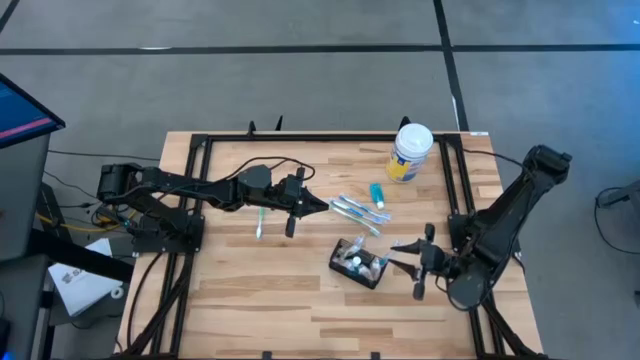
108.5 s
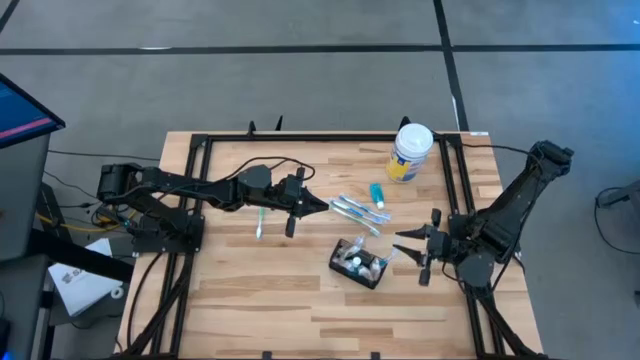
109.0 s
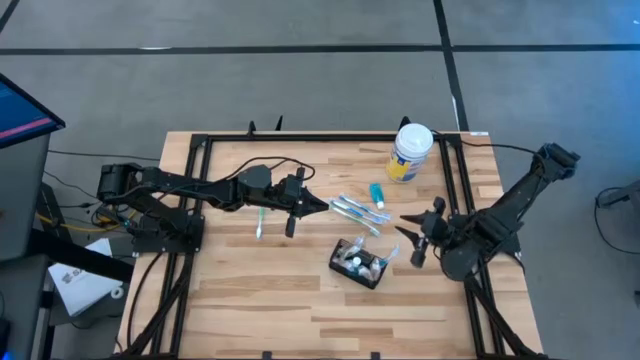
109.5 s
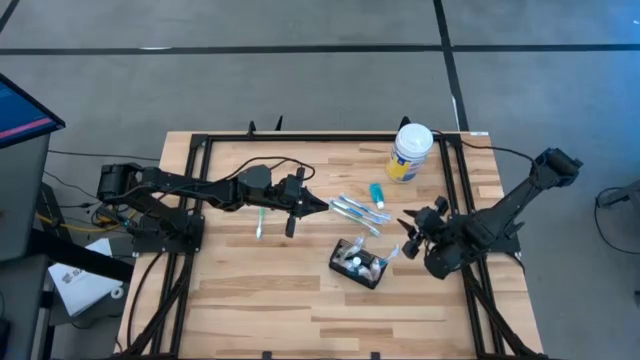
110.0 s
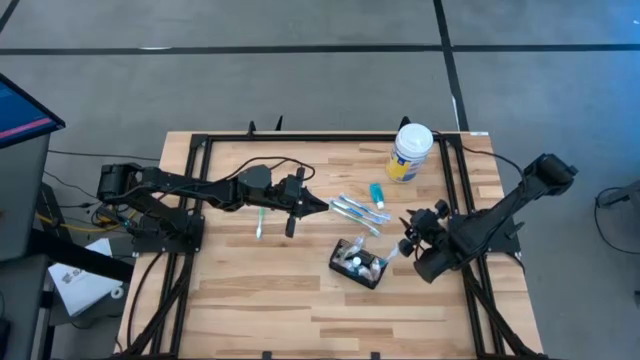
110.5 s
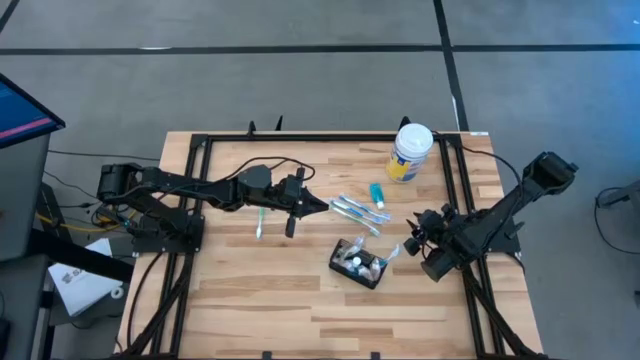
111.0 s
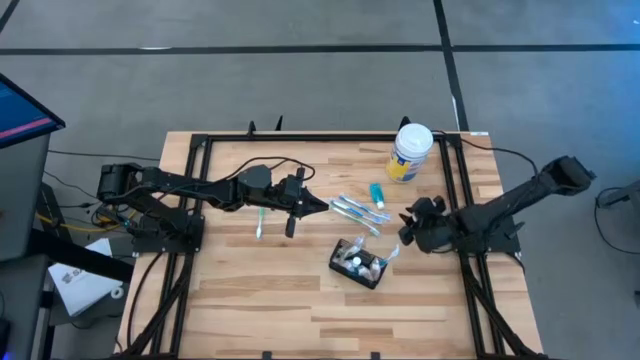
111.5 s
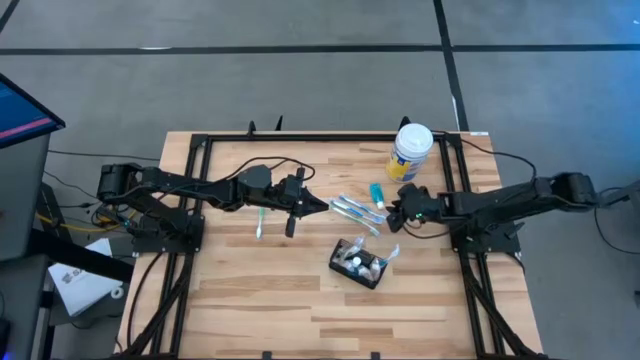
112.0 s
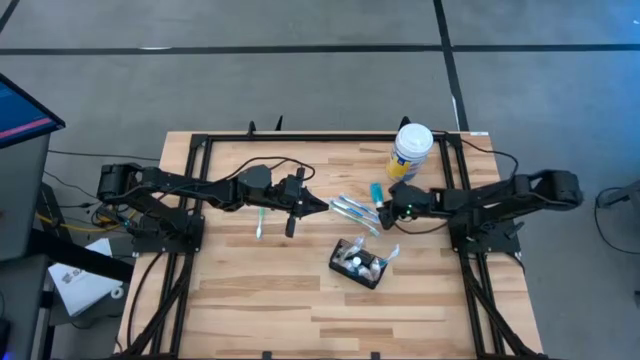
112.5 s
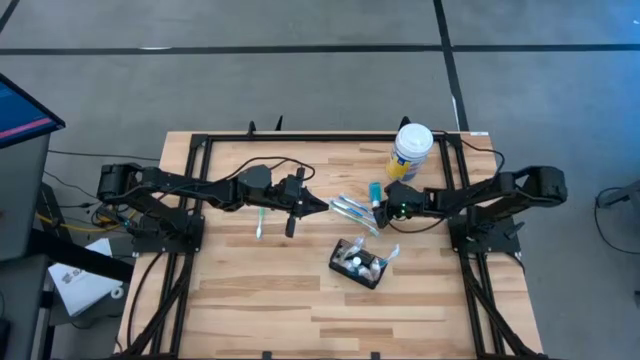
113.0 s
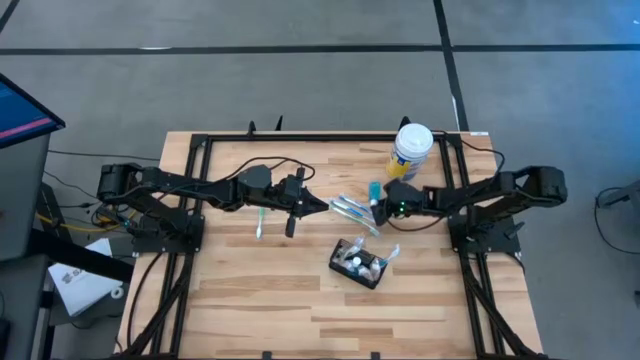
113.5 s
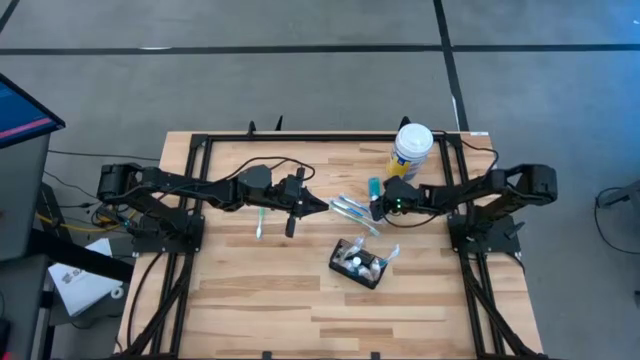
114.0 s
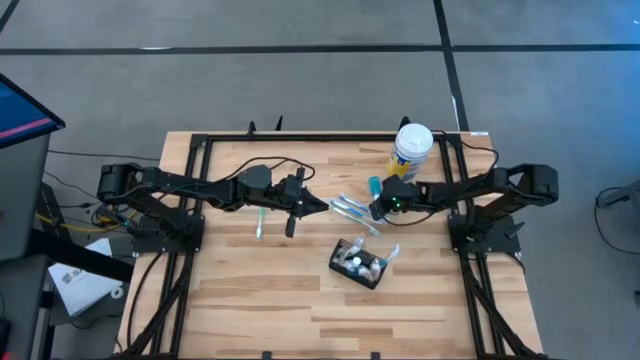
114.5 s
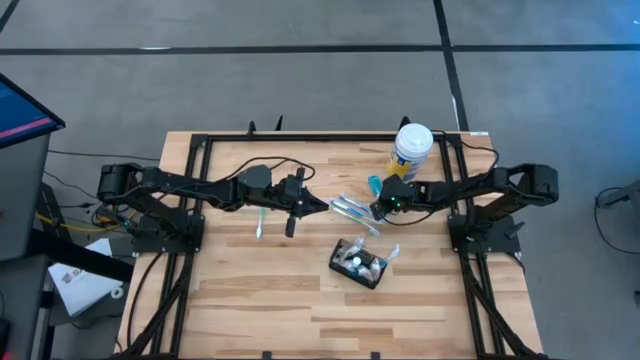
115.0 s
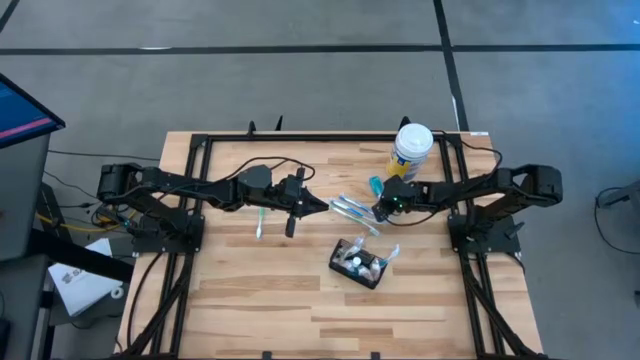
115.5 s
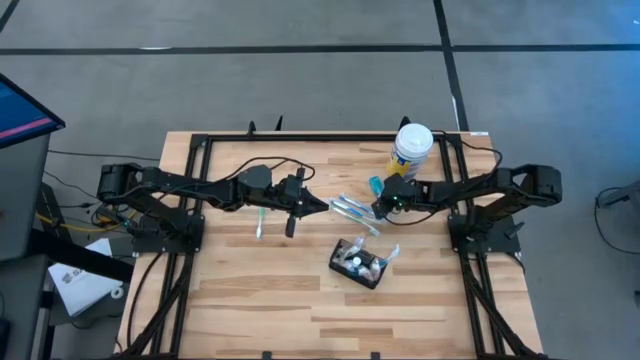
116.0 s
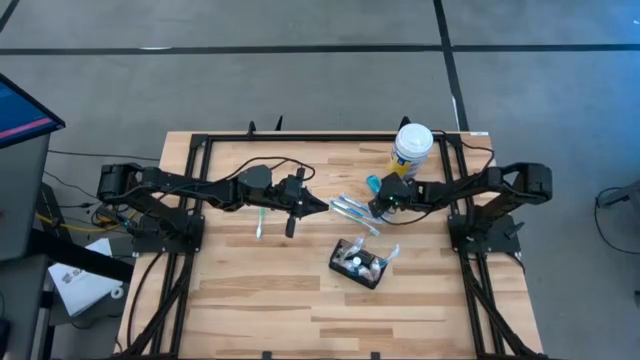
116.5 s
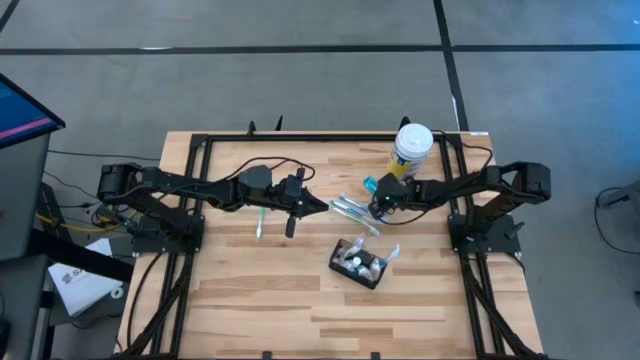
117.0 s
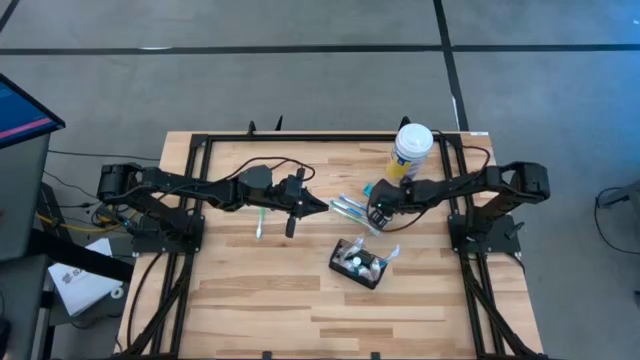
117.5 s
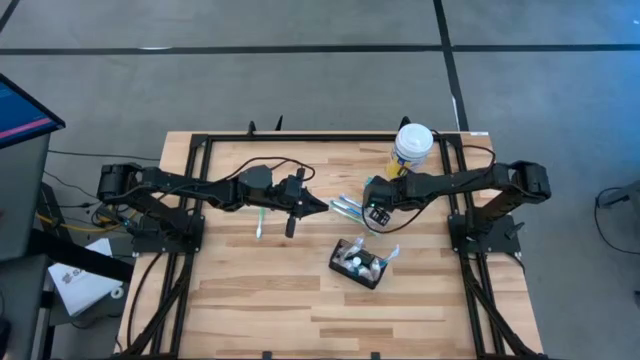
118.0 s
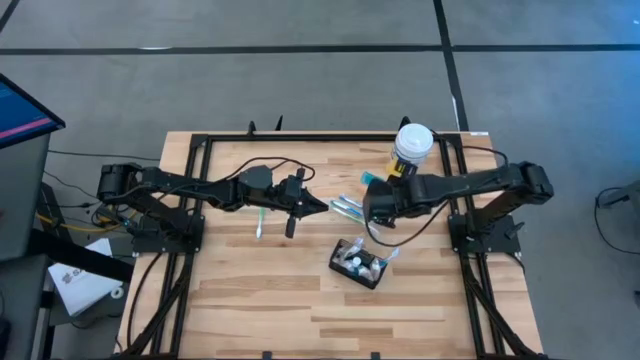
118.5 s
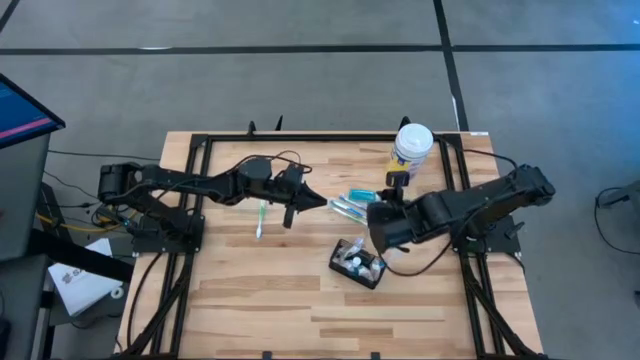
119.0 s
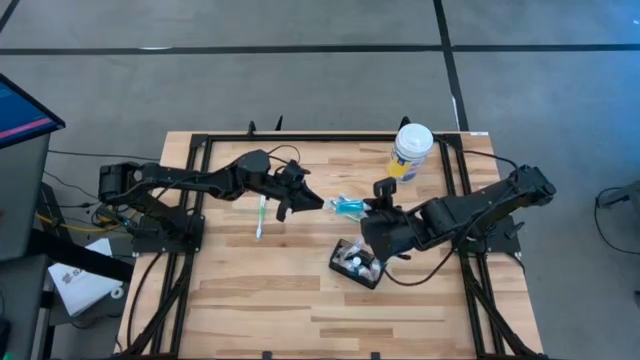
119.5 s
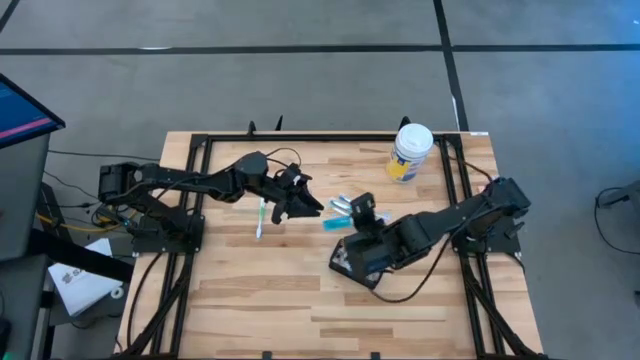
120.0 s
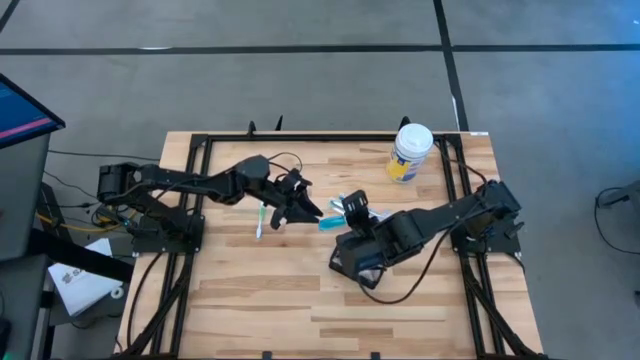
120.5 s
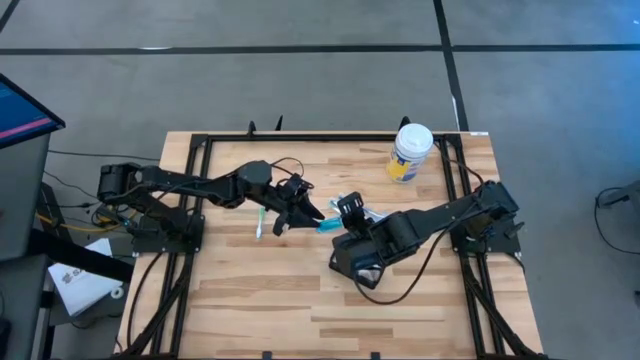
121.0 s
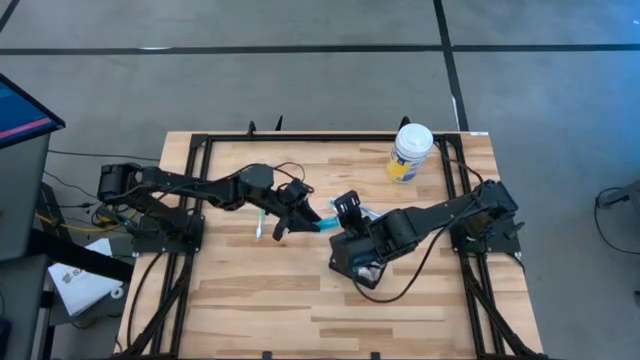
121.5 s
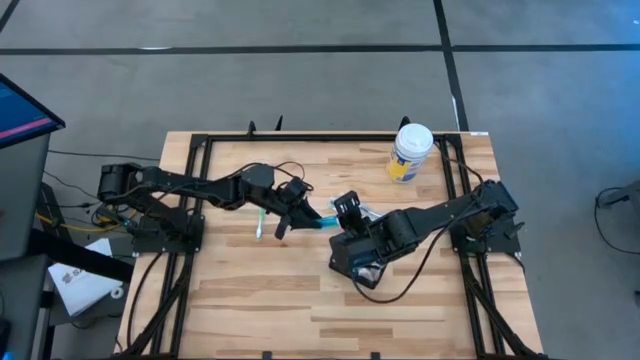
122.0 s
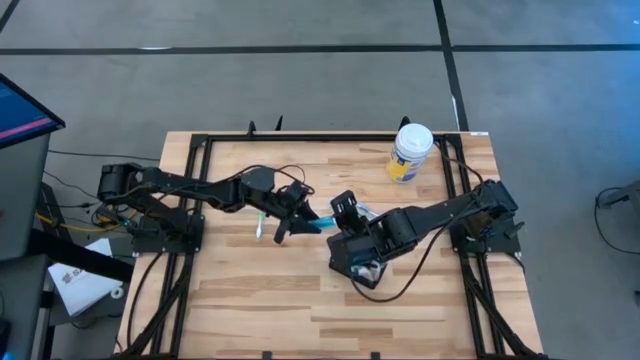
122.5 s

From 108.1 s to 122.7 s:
Task: Pick & Place toothbrushing station
Put the blue mouthwash into the mesh organizer

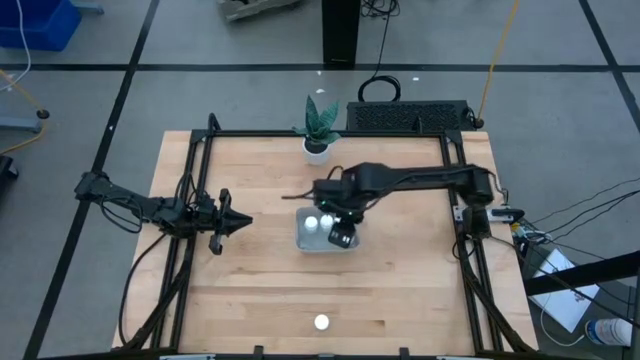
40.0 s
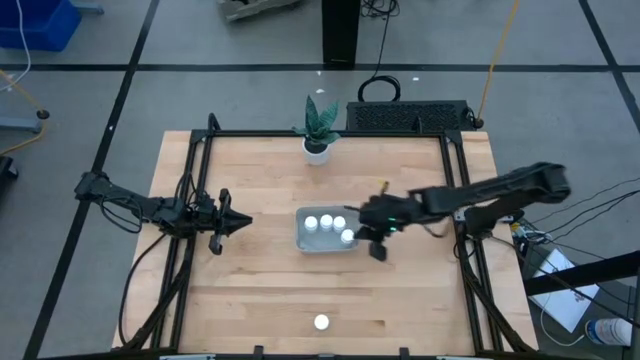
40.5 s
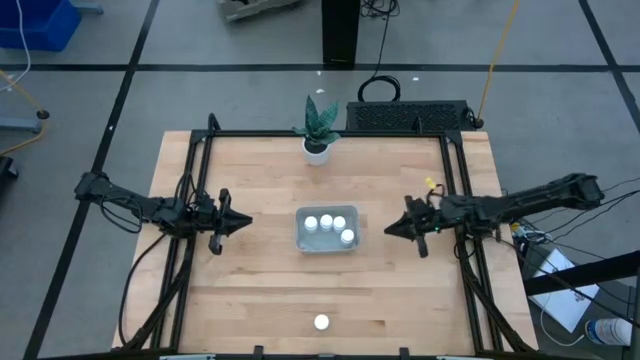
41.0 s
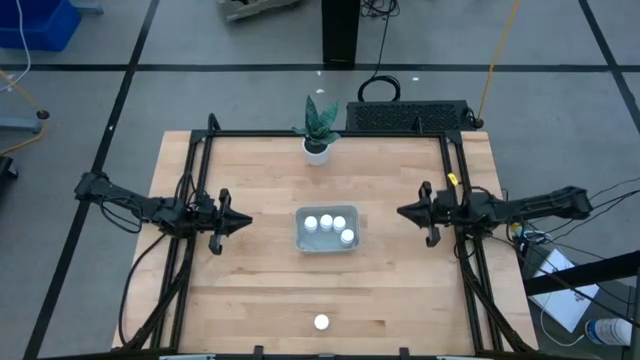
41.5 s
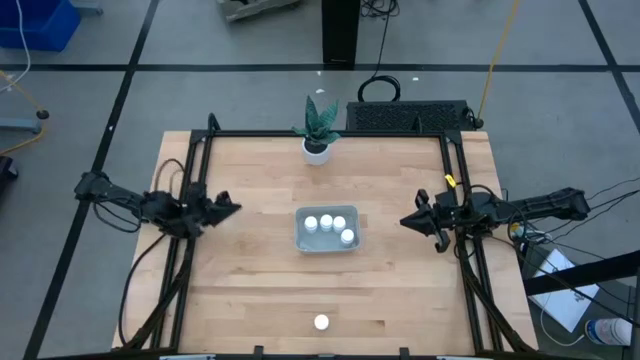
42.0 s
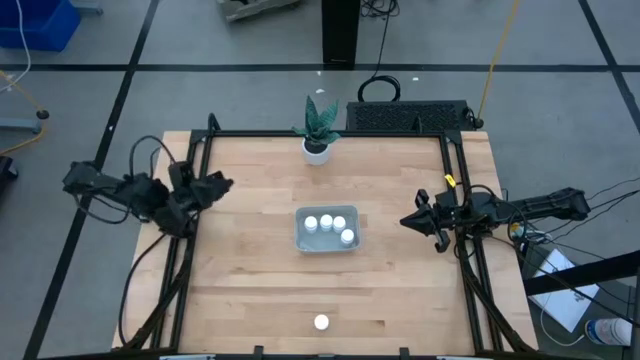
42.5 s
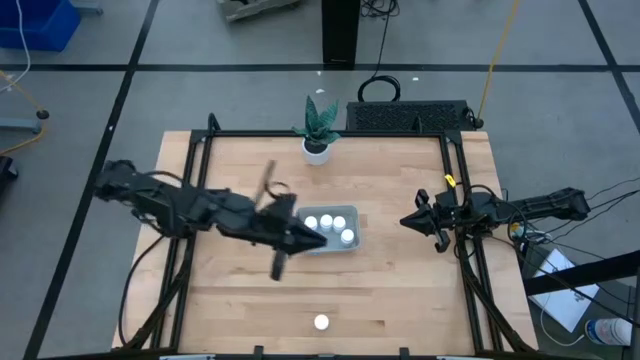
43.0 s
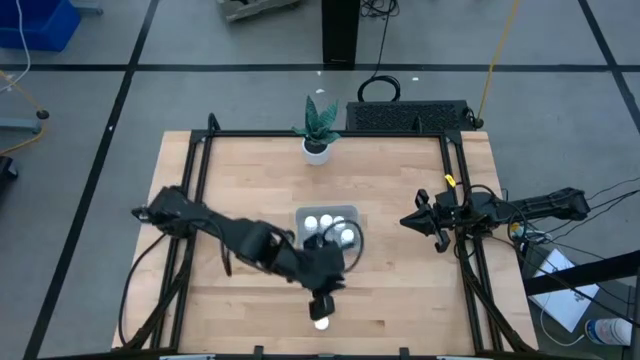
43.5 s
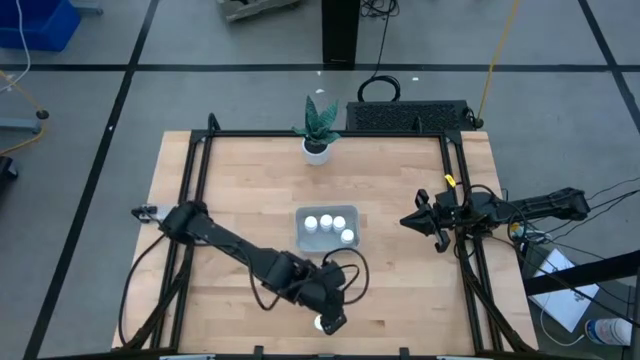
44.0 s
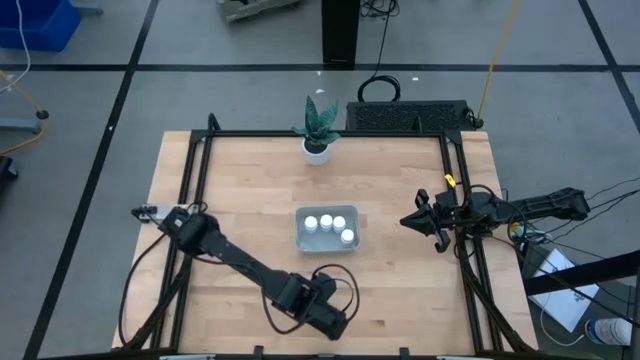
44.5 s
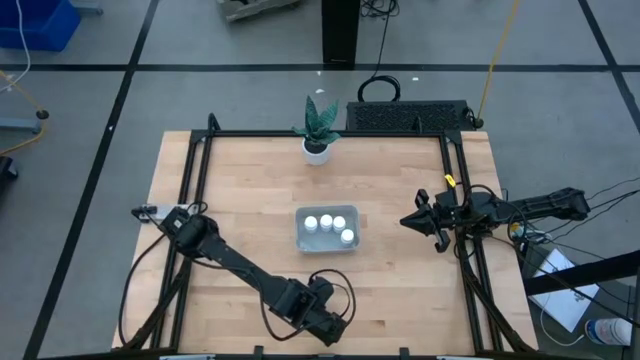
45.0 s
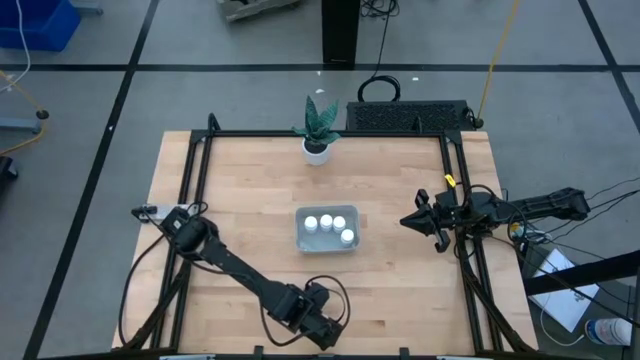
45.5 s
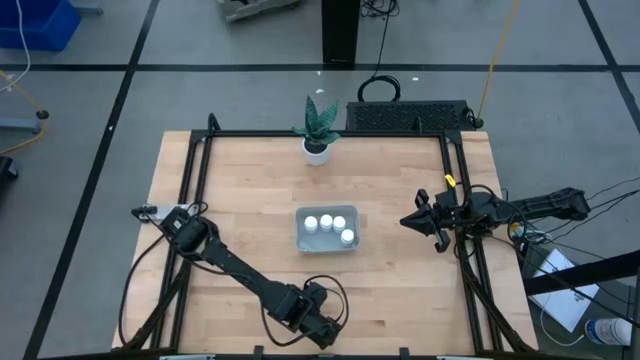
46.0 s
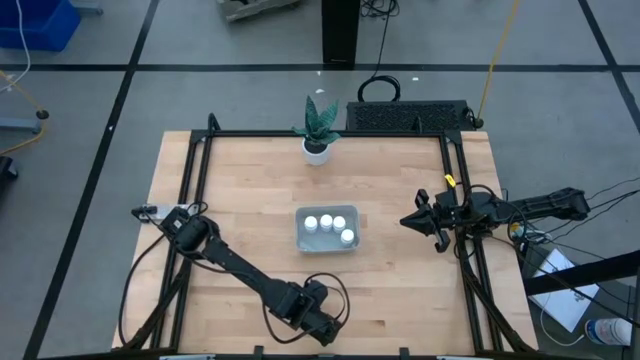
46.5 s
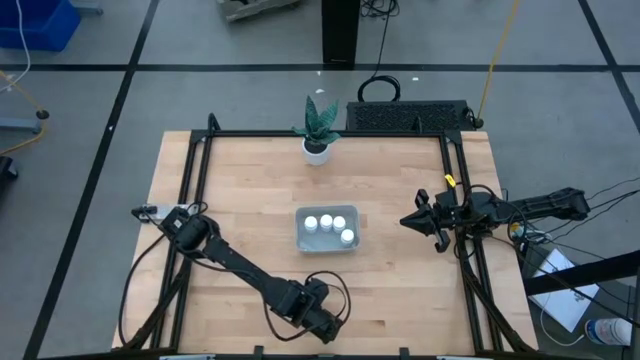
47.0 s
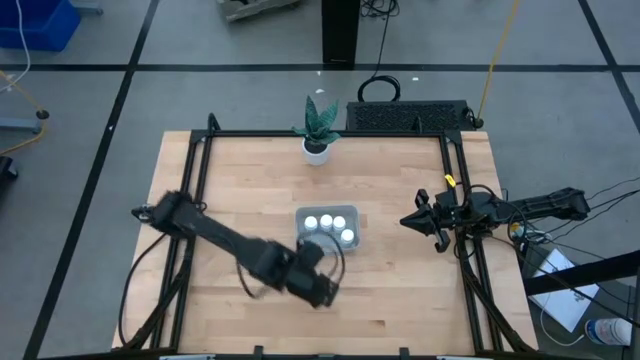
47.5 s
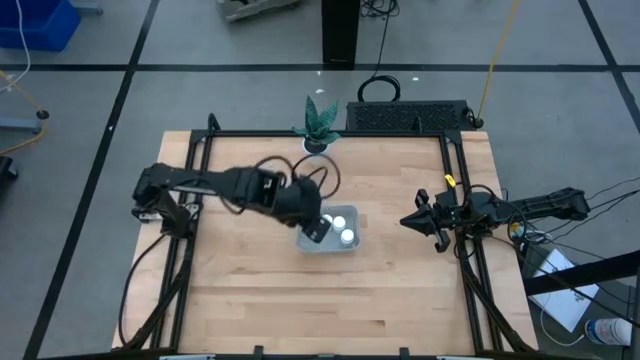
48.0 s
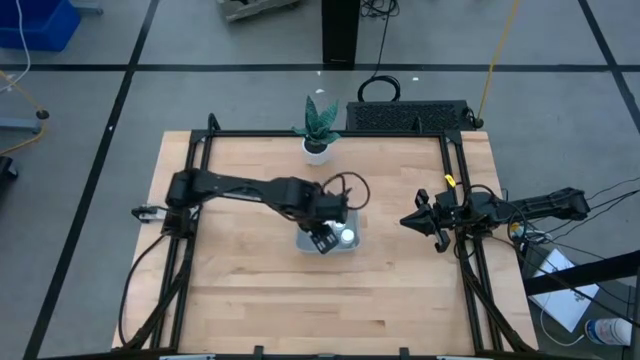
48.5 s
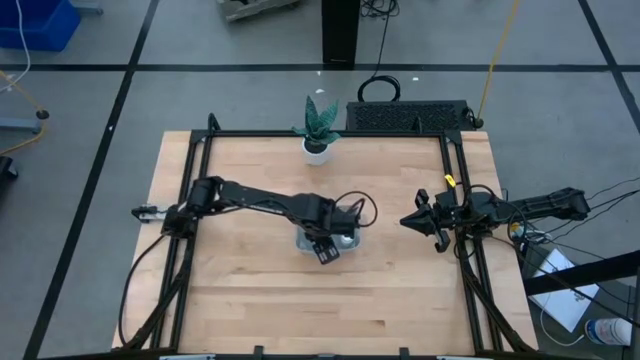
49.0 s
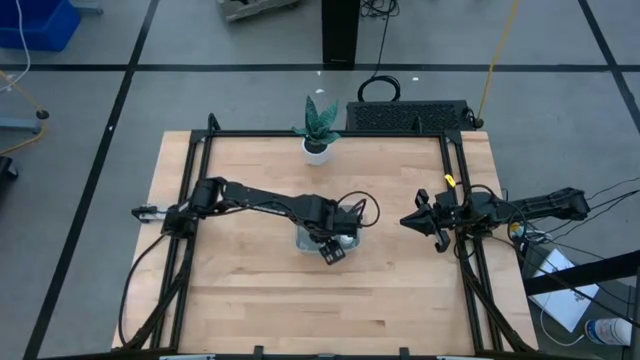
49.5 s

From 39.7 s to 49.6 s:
Task: Pick and place pill bottles into a basket
Put the white pill bottle into the gray bin
